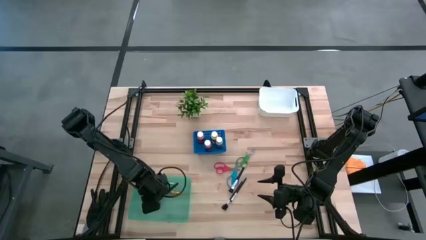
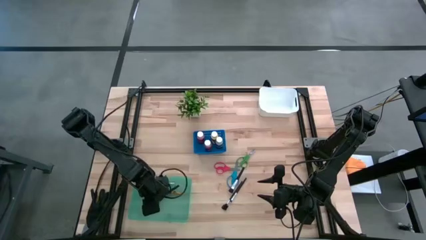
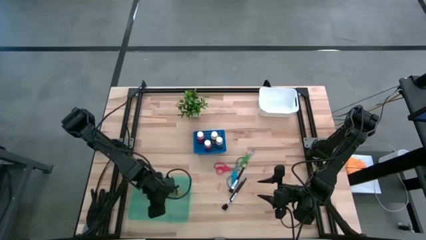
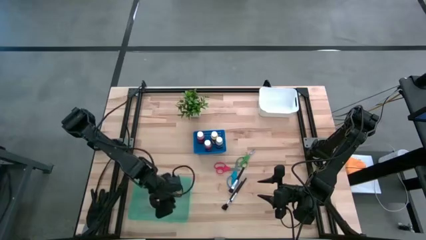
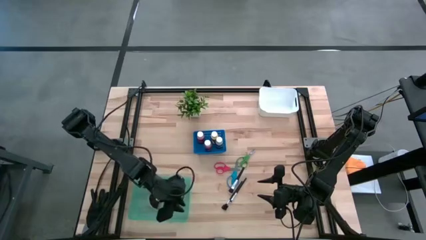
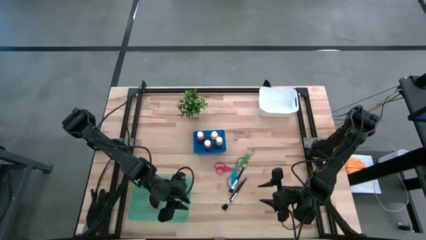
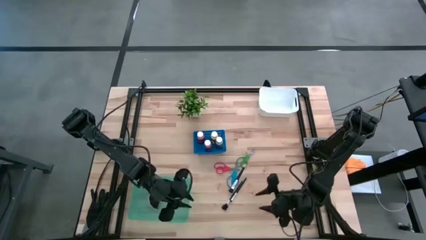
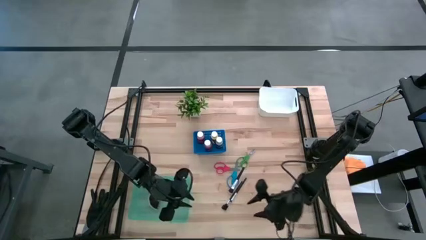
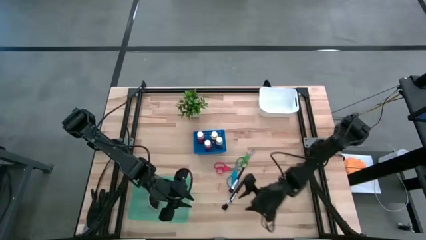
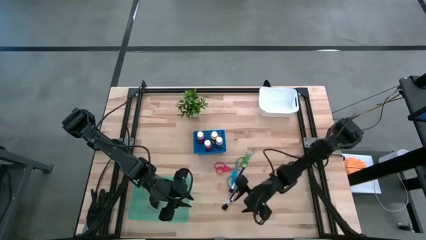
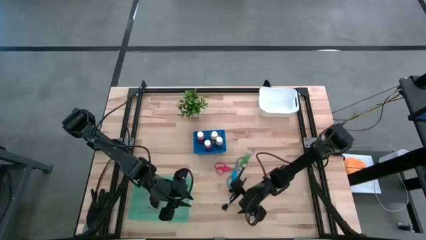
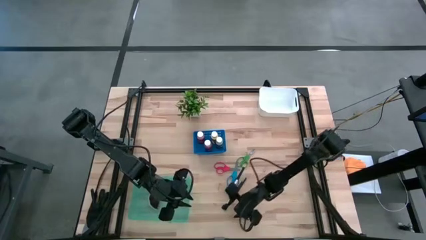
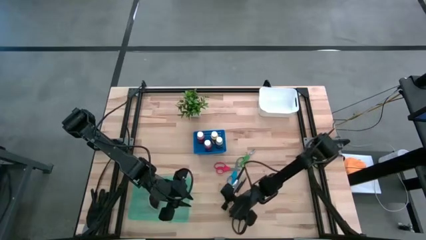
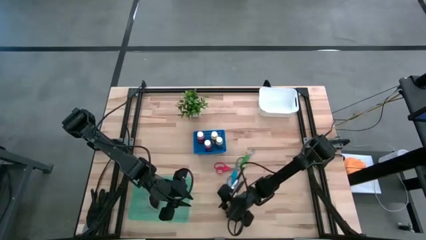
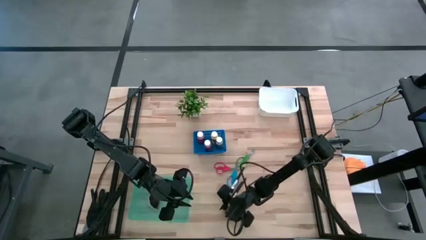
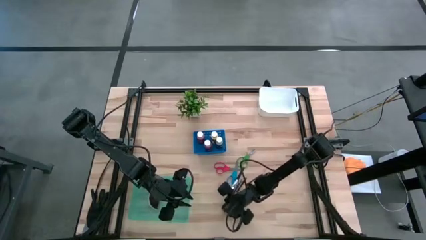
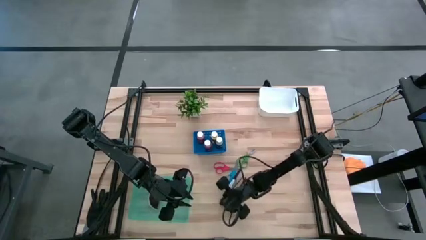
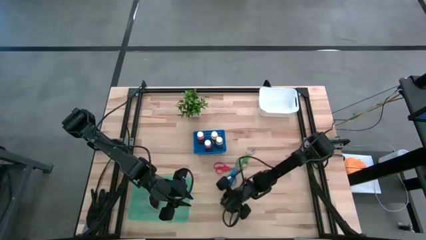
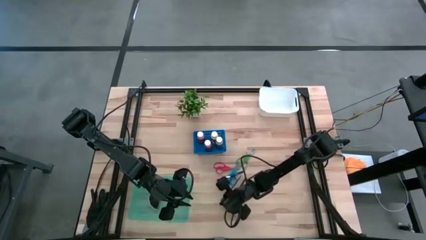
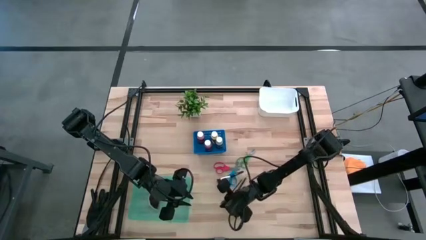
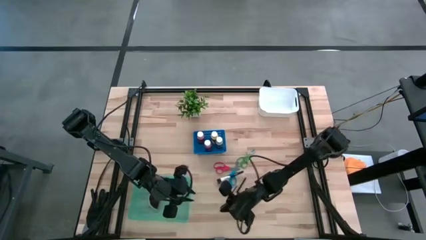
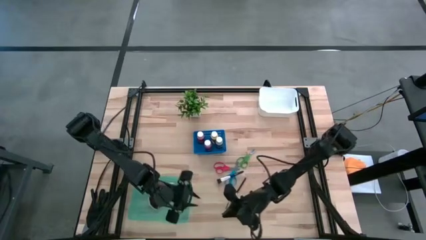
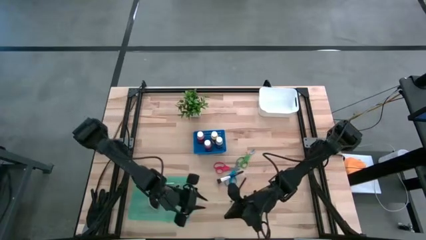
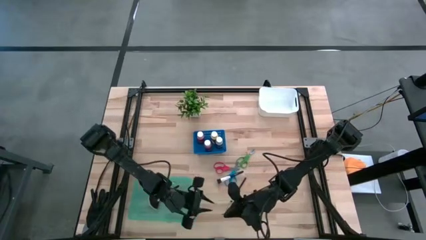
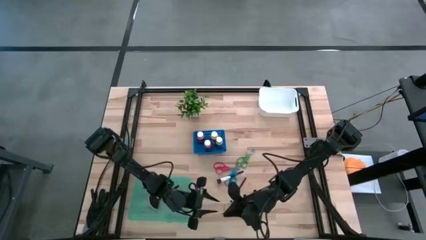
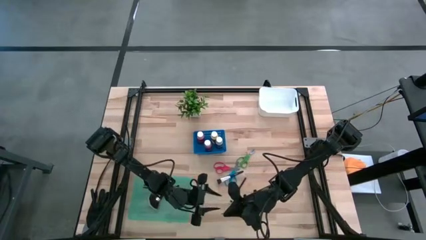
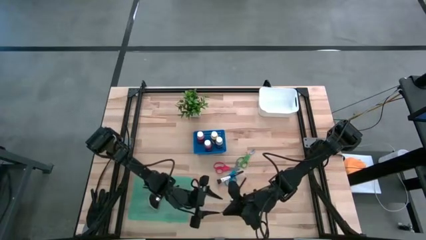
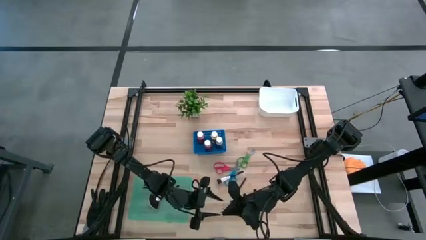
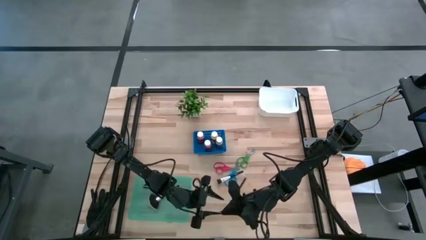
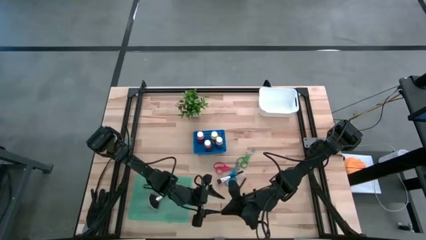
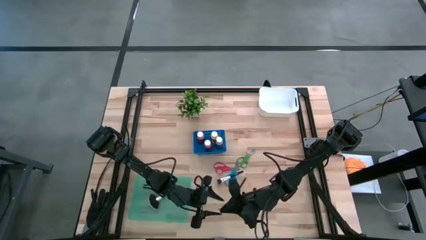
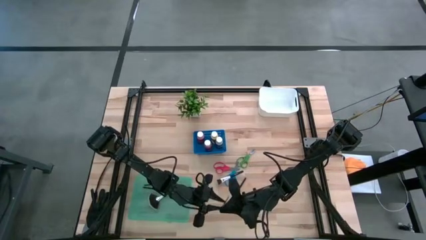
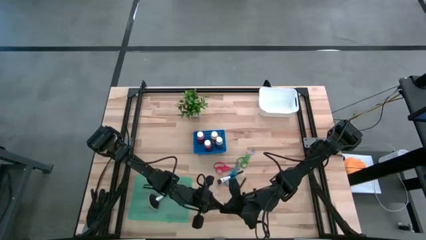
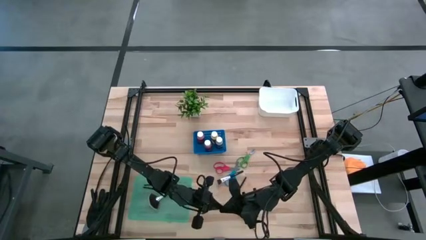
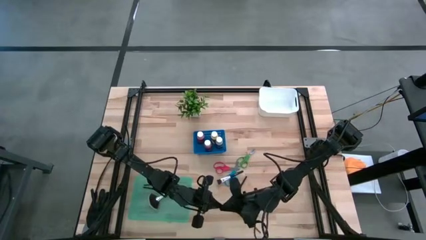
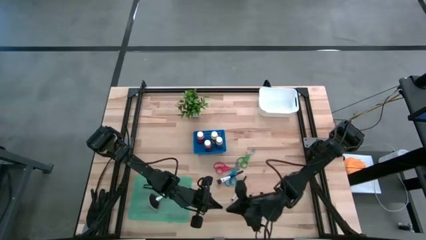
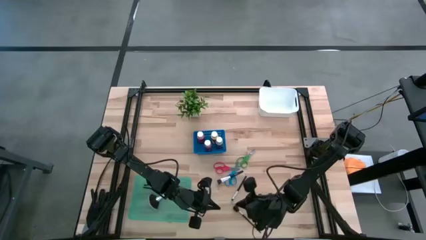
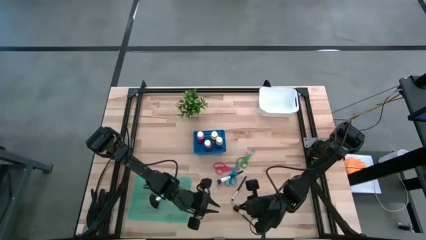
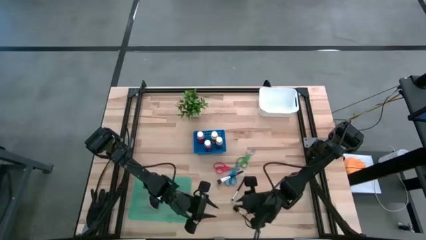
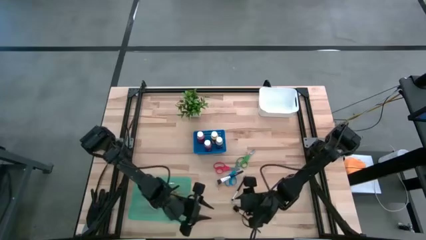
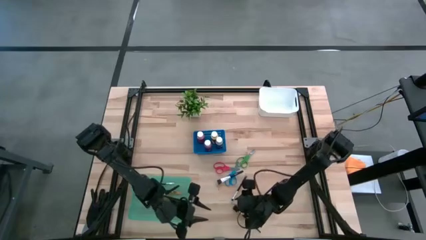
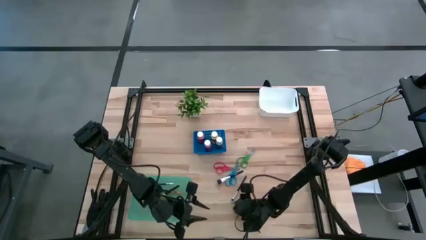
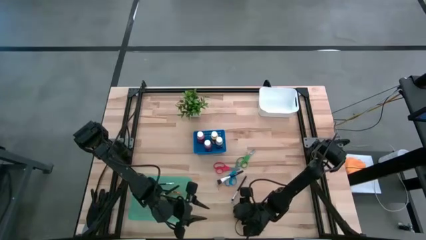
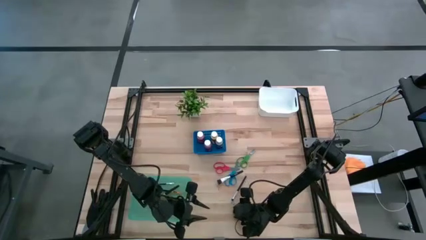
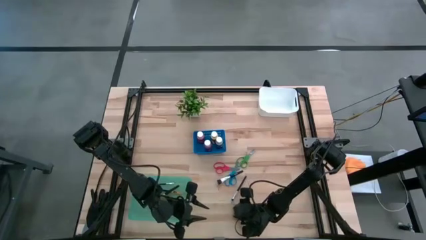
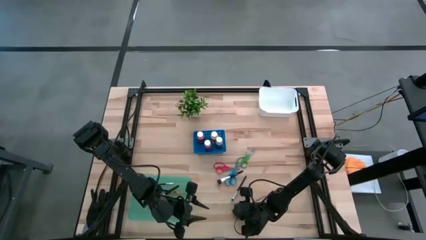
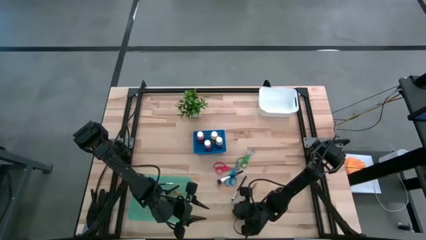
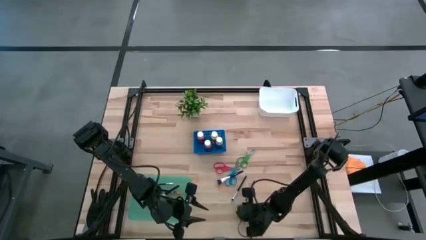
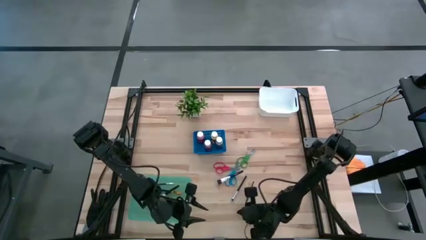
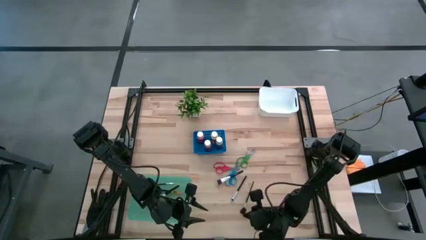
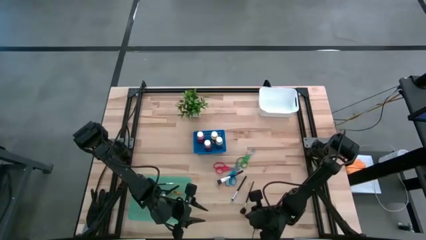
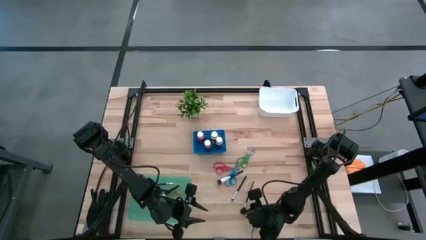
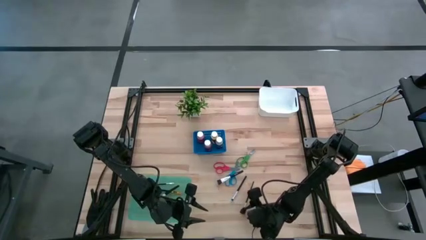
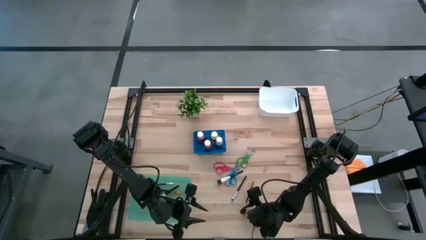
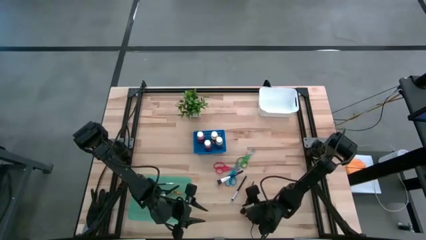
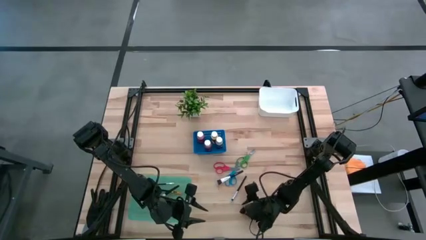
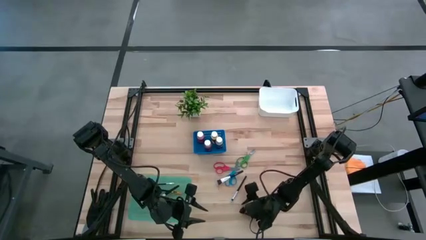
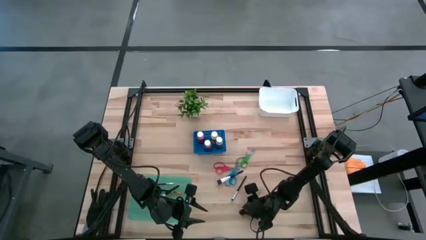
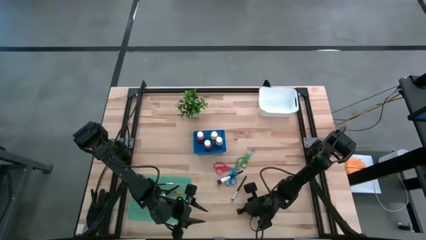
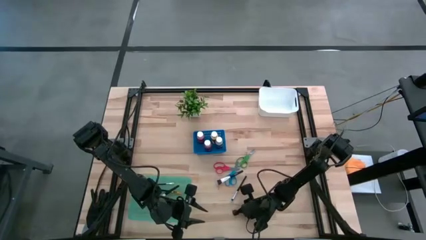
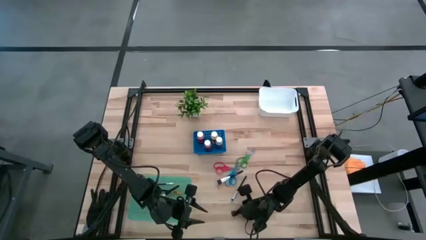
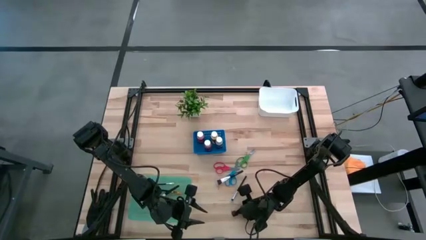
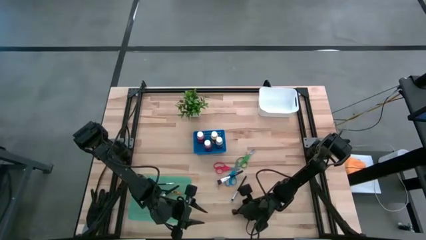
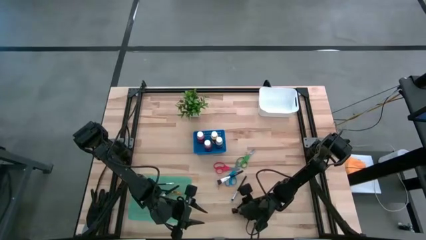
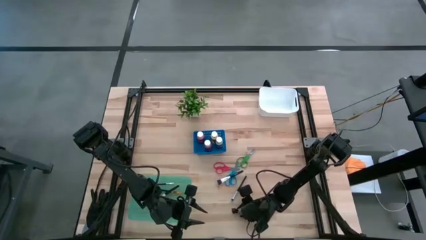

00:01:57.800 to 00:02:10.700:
Task: Pick & Place Paint Supplies
Put the brow brush into the green bin

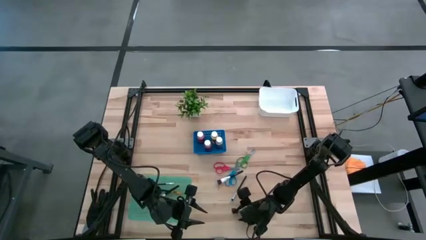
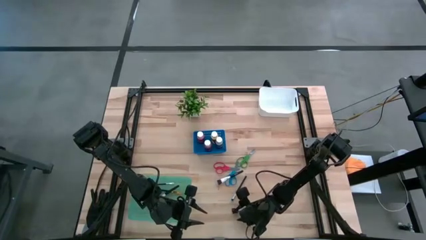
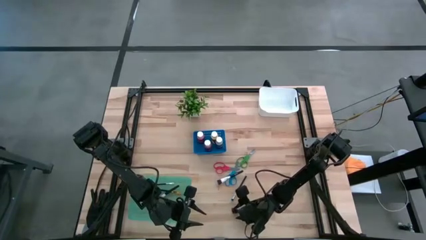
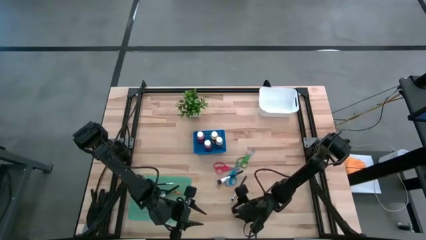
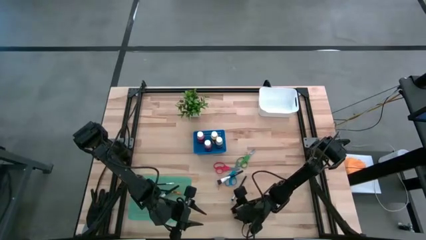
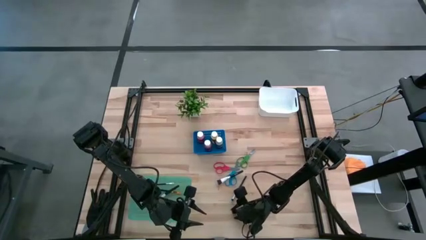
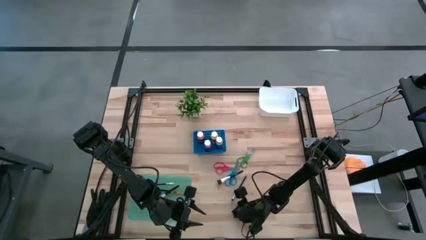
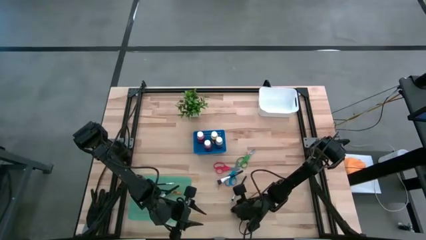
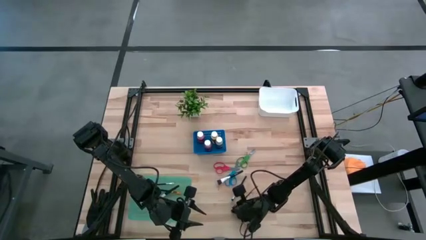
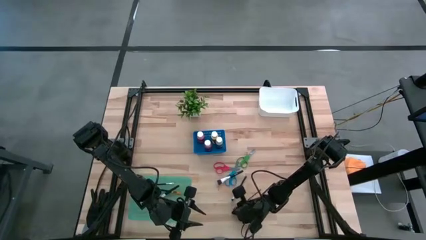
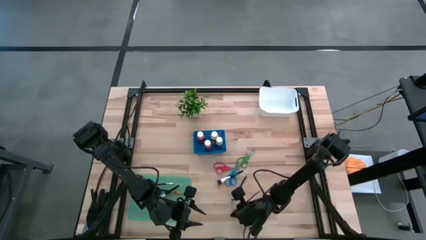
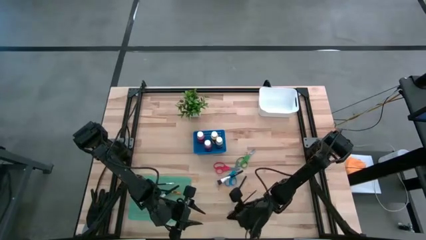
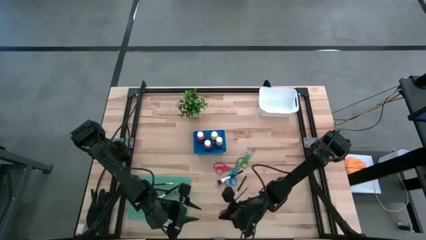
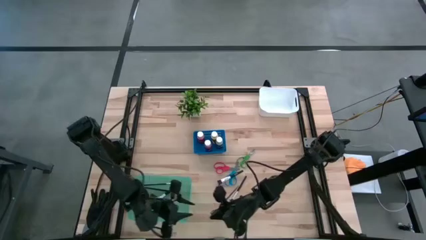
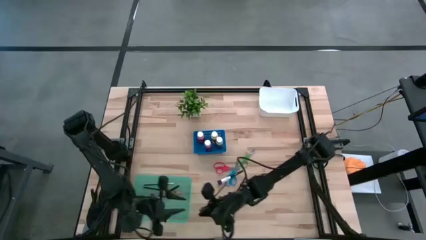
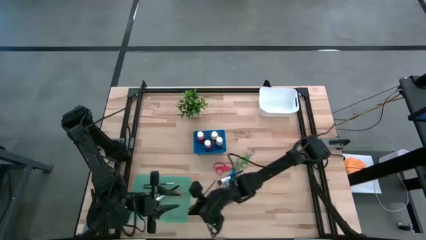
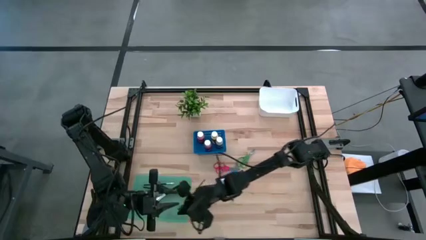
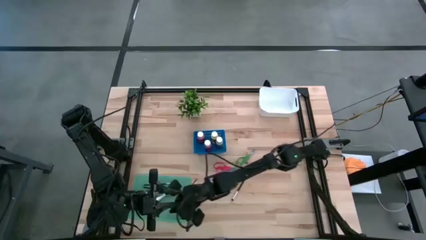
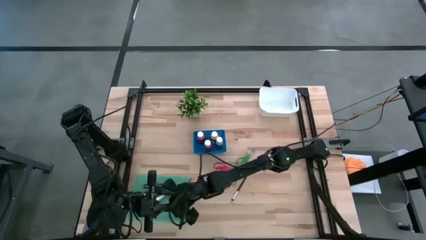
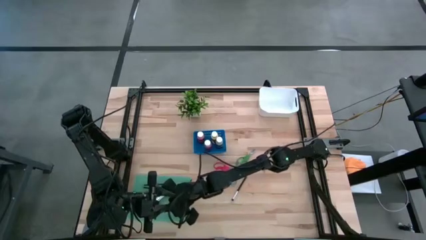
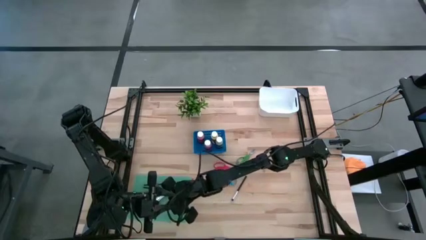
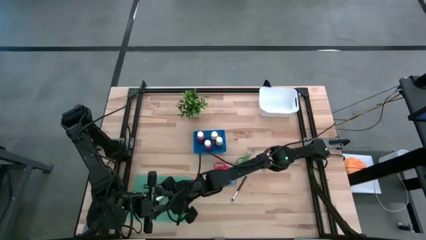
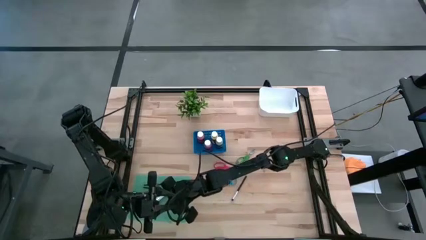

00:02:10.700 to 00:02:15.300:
Put the brow brush into the green bin
